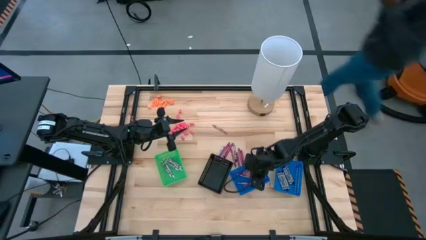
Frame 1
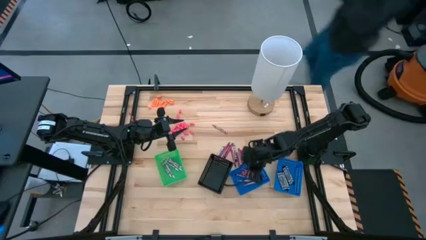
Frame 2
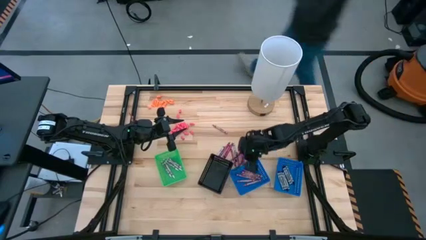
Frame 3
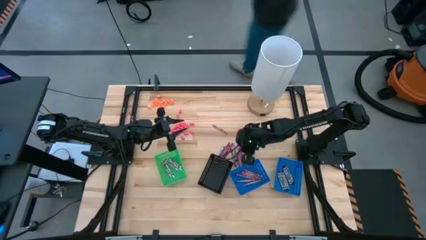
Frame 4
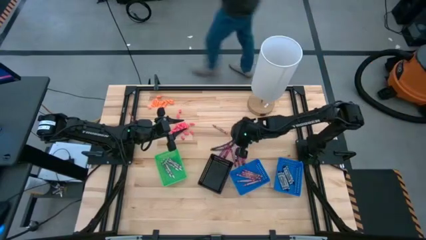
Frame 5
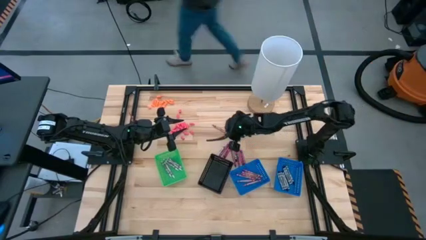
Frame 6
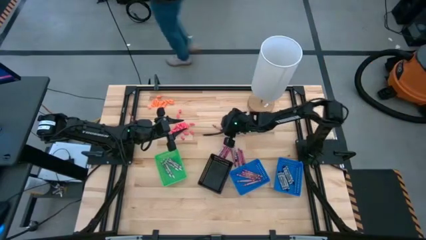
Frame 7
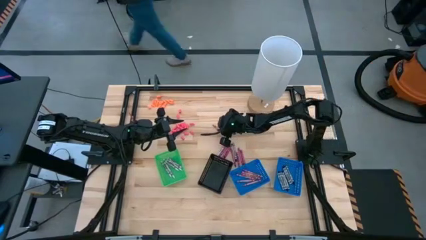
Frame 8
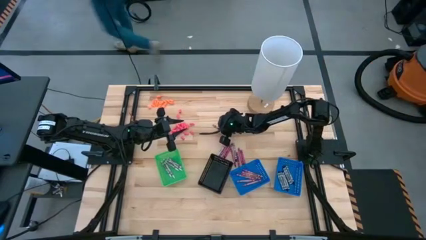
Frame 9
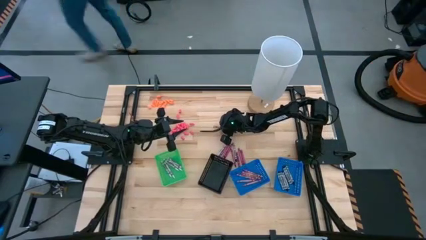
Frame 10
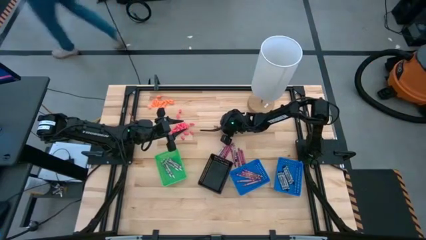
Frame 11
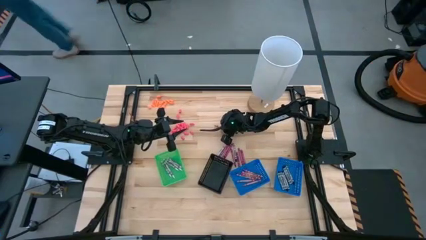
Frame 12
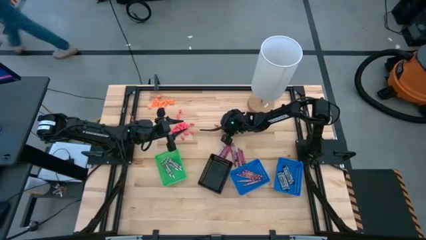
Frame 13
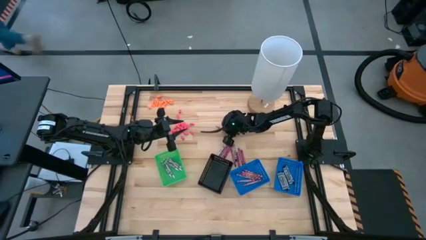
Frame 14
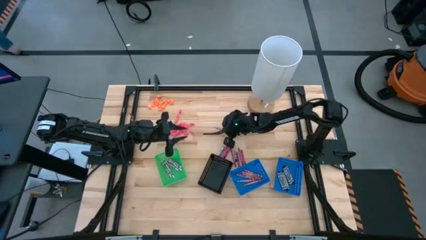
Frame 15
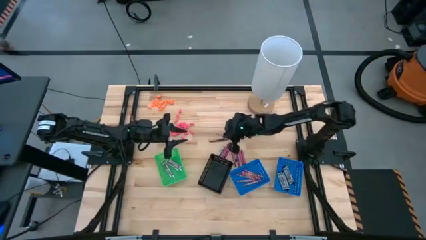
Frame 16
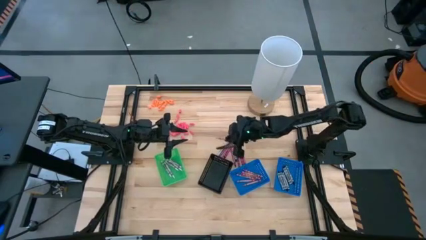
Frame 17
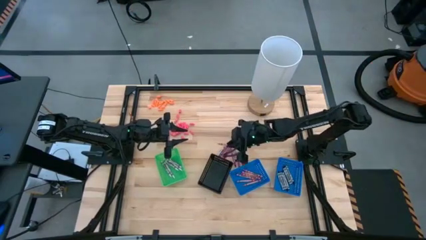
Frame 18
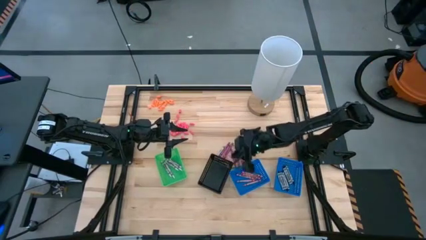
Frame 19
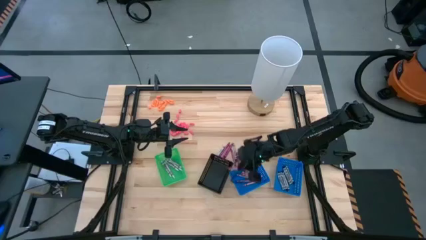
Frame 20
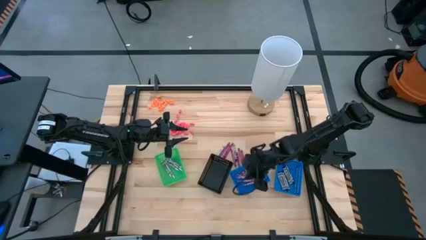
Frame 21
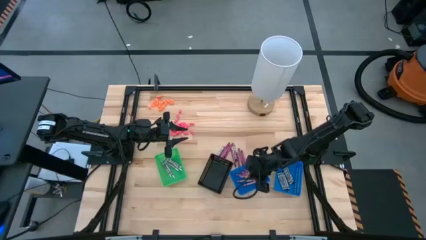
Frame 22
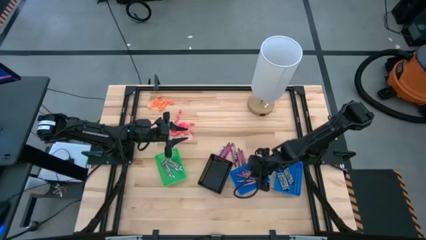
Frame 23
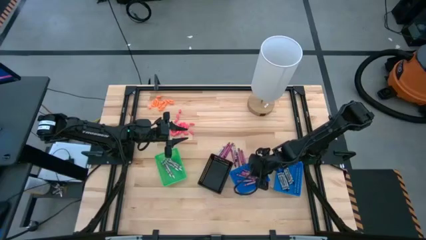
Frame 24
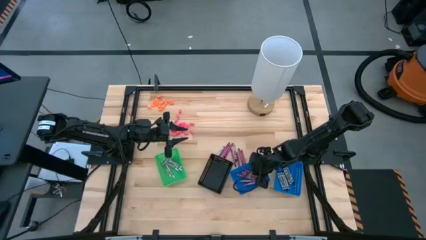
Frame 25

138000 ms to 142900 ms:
Task: Sort crayons
Put the pink crayon into the left blue bin

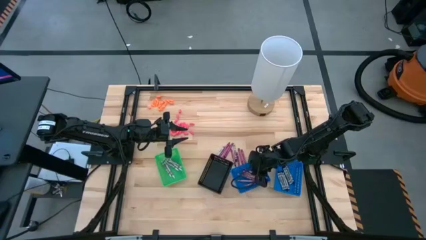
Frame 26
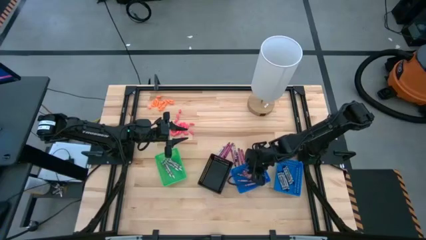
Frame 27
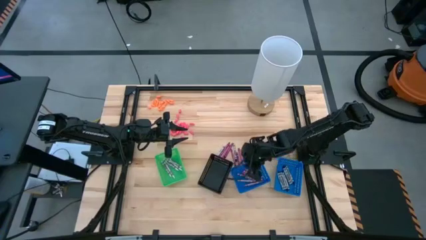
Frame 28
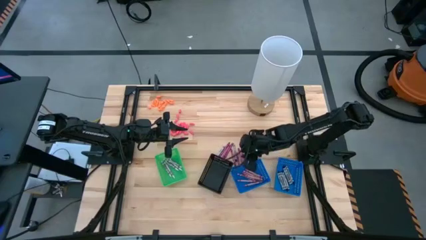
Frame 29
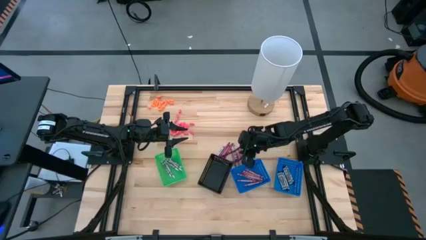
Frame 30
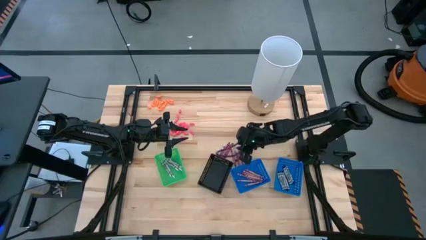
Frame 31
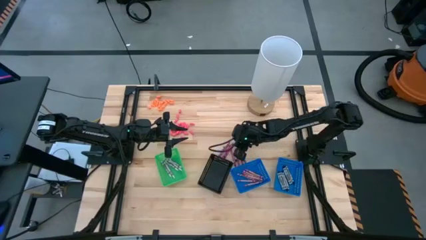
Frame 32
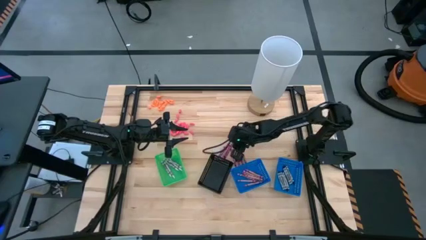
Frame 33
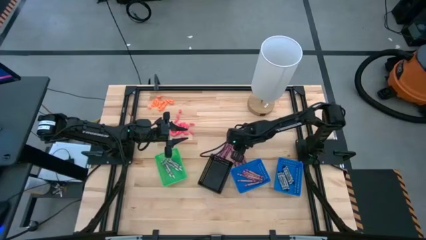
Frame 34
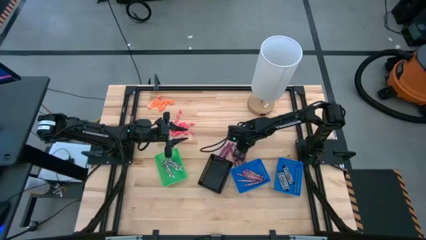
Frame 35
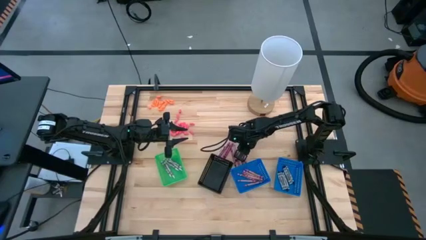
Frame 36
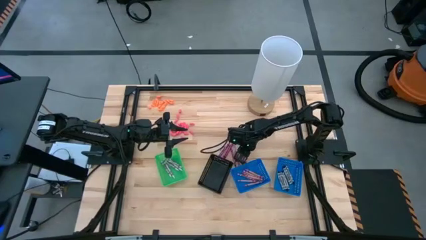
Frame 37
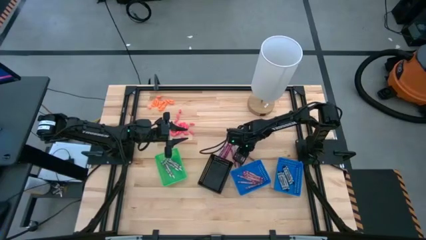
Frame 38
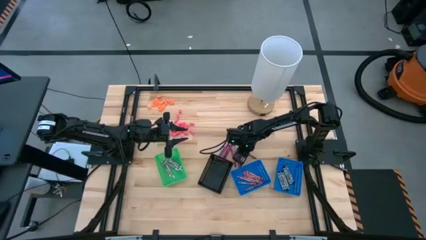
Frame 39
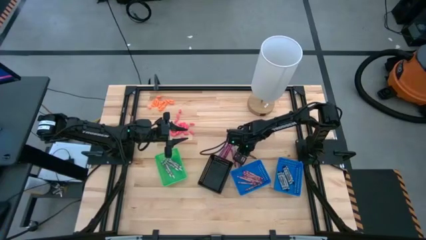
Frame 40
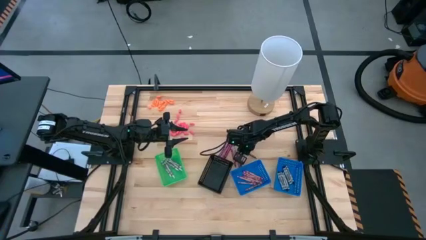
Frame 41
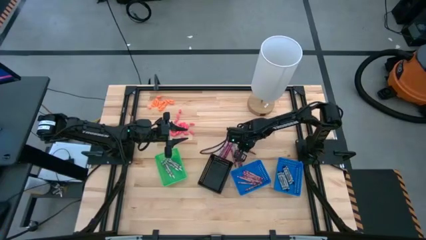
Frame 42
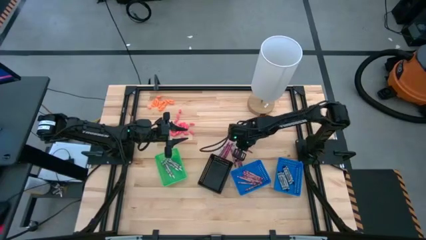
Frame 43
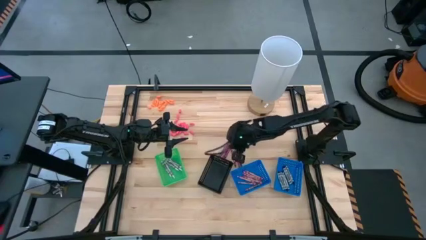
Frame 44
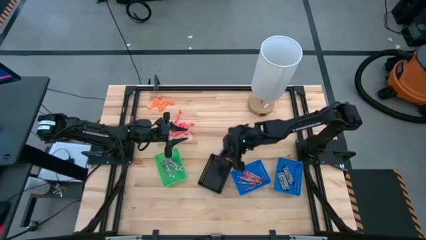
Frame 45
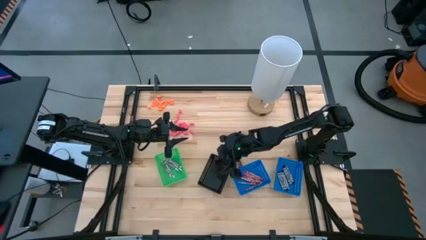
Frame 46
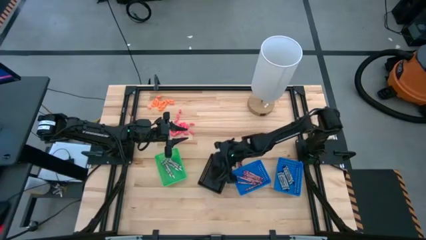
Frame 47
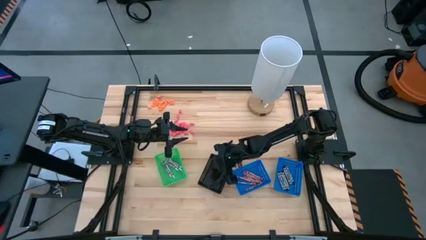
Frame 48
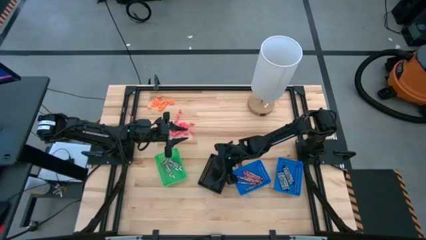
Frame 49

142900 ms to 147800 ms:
Put the red crayon into the black bin

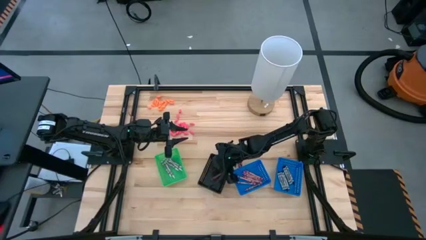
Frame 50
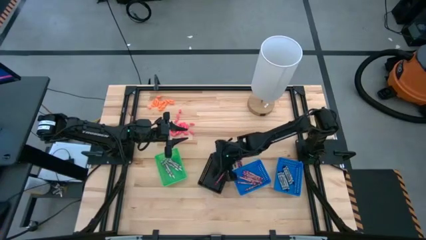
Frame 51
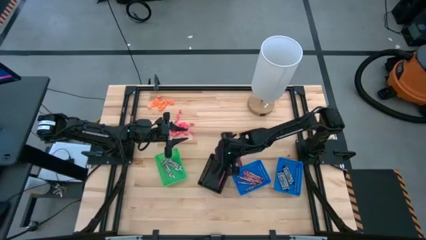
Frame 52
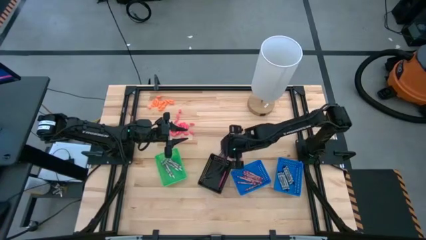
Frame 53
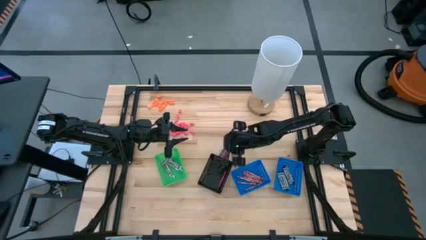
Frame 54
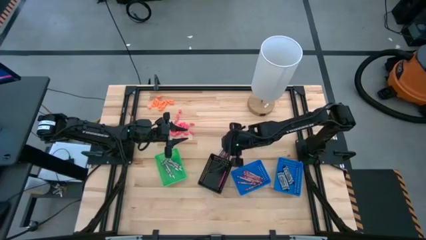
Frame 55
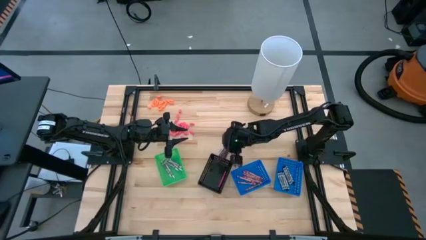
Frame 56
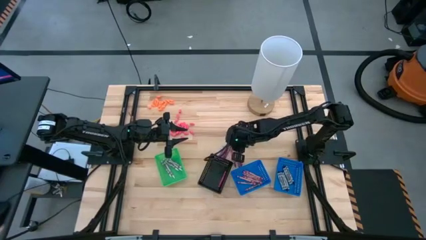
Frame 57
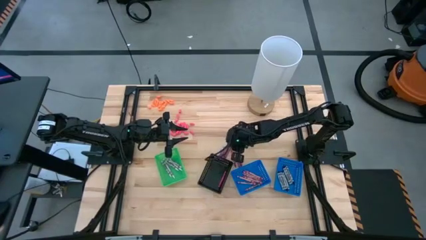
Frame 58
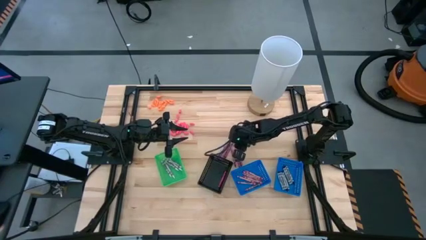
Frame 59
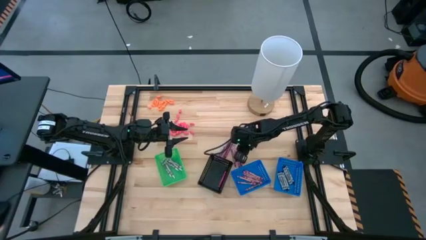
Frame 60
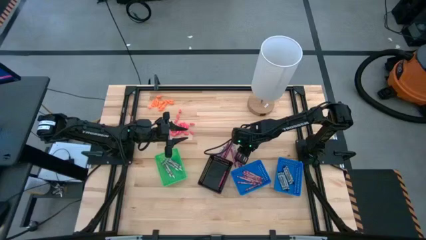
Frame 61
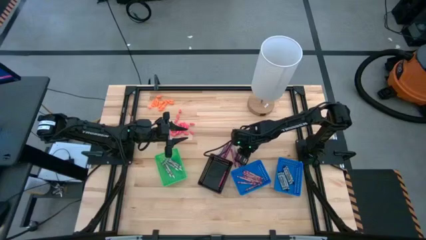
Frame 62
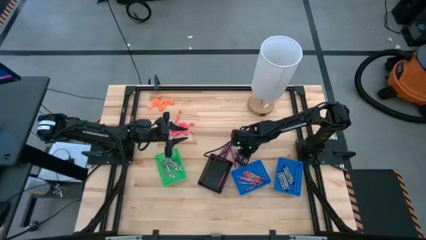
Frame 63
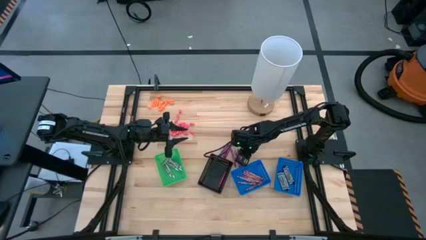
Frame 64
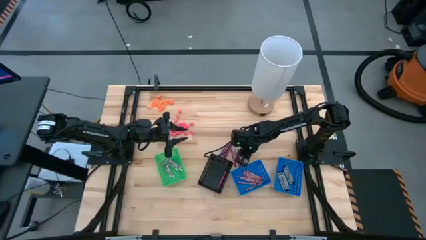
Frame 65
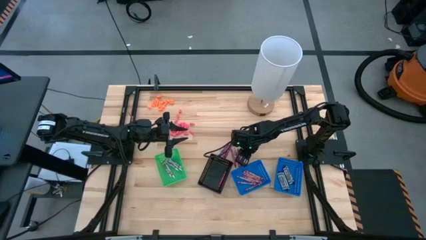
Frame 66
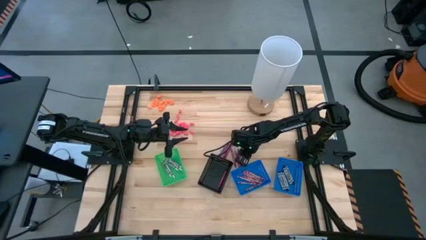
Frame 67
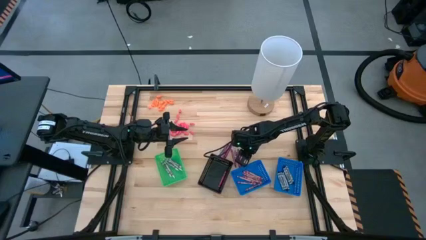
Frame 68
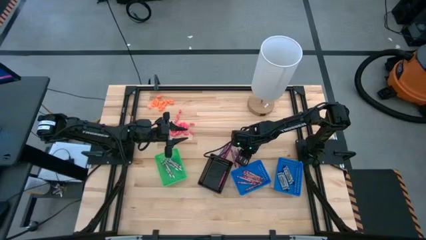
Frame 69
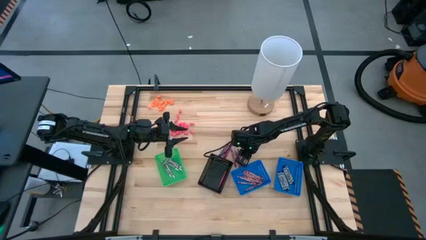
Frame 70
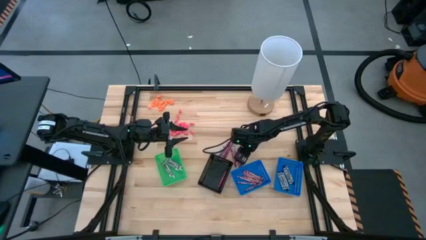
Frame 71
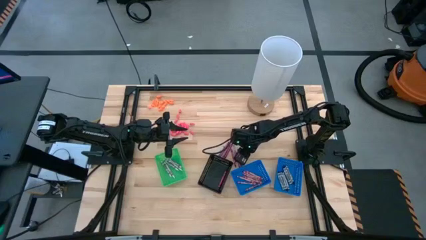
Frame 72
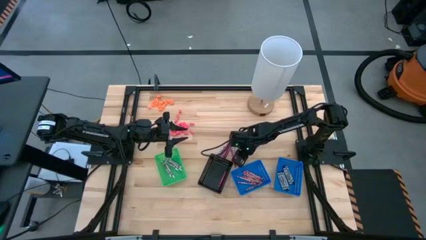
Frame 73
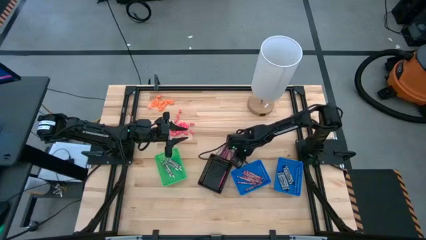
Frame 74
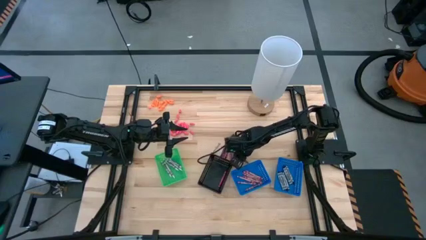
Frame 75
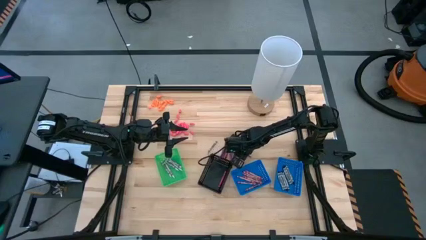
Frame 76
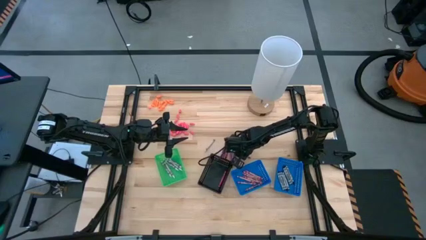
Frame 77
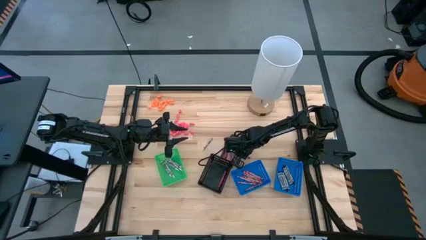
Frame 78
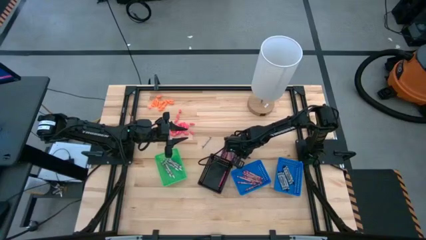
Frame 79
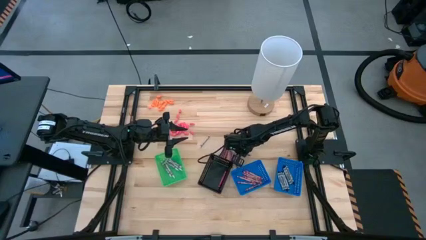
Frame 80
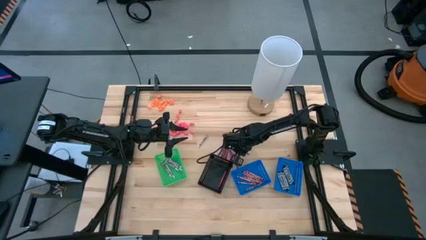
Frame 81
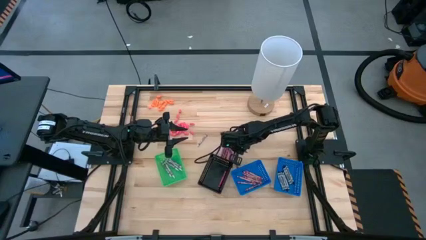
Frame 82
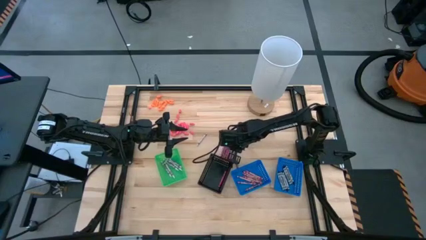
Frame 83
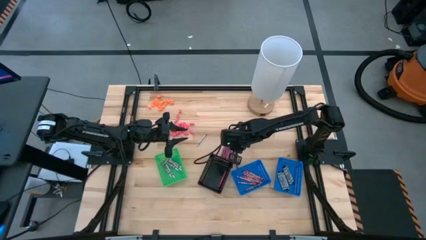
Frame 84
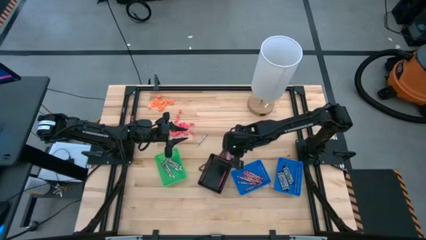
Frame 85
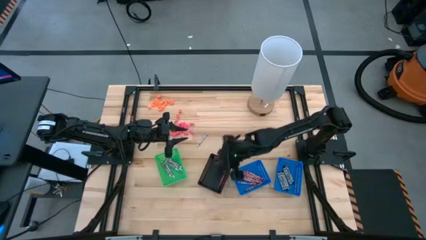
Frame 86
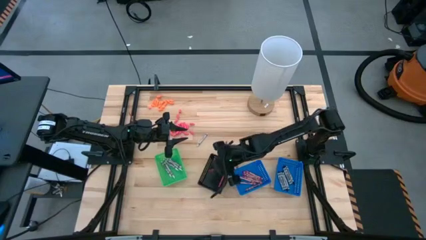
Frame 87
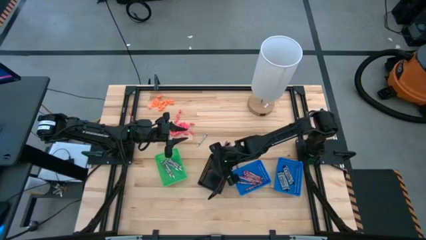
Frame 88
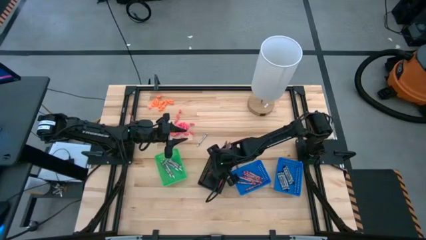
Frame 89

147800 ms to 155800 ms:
Put the red crayon into the black bin
